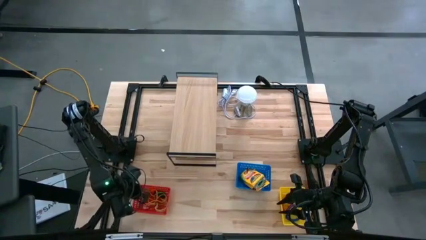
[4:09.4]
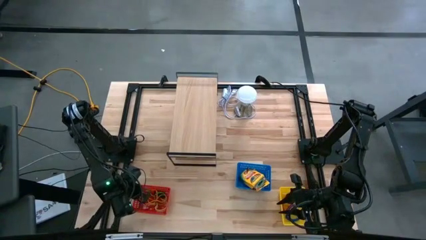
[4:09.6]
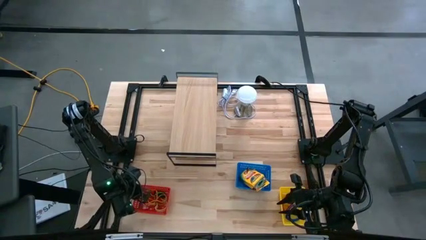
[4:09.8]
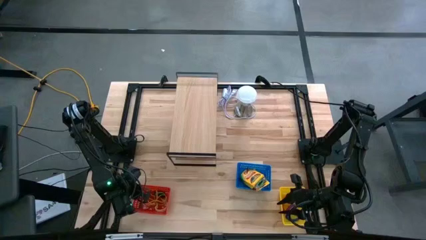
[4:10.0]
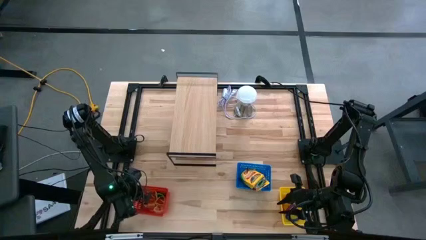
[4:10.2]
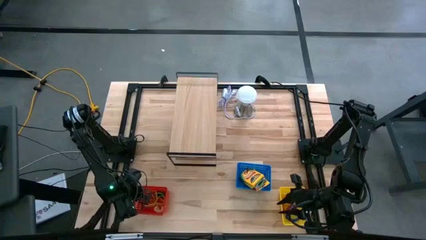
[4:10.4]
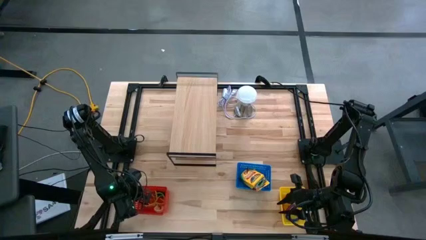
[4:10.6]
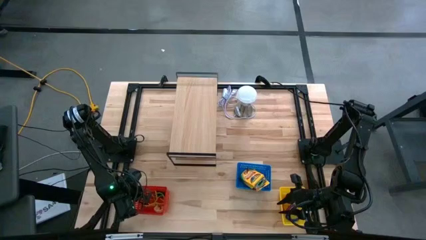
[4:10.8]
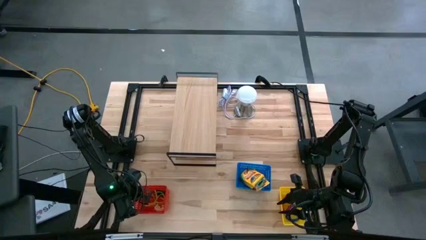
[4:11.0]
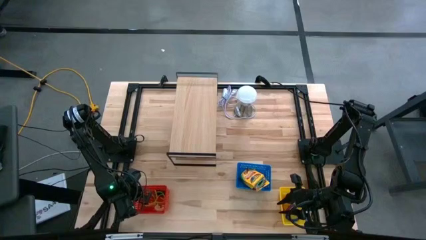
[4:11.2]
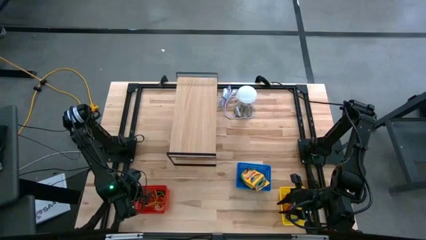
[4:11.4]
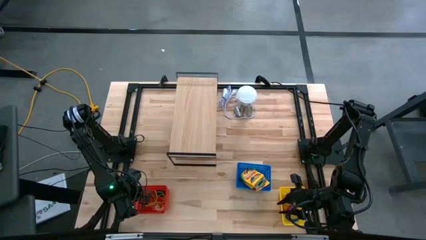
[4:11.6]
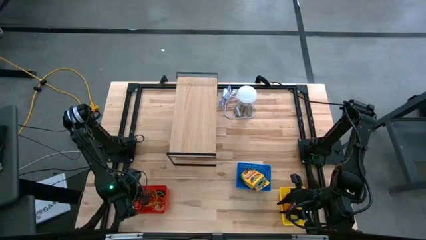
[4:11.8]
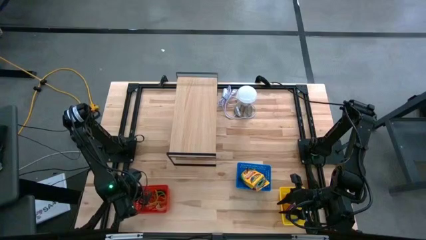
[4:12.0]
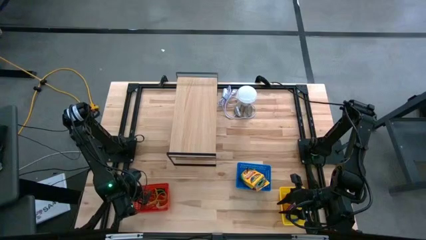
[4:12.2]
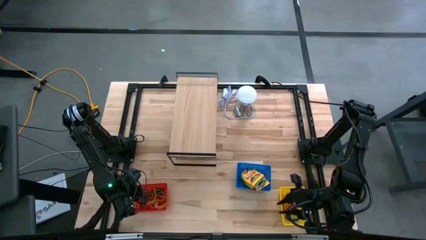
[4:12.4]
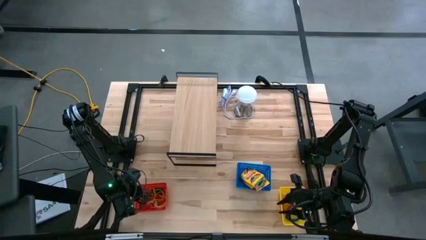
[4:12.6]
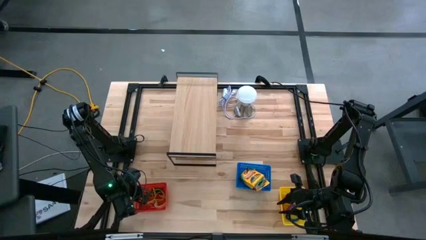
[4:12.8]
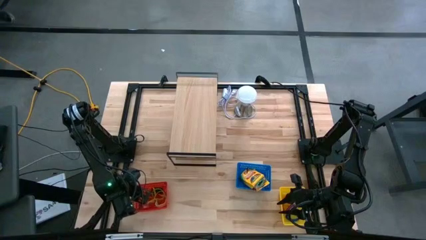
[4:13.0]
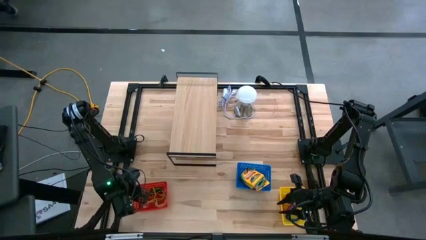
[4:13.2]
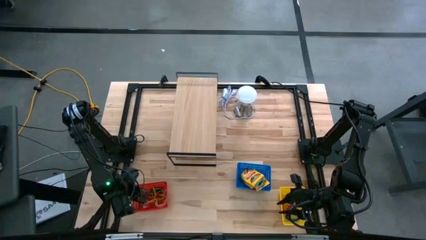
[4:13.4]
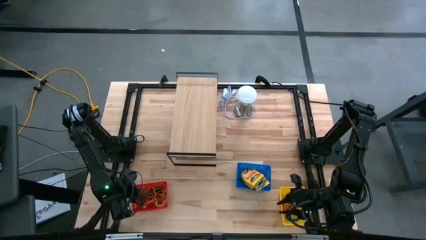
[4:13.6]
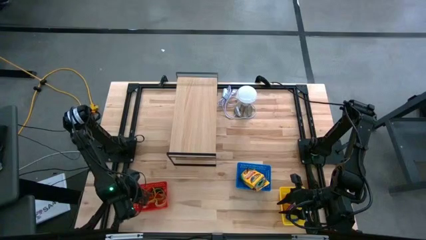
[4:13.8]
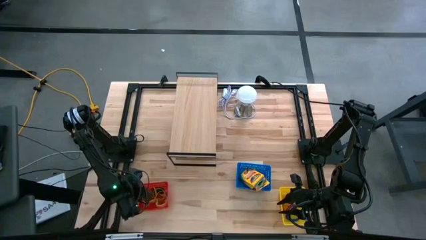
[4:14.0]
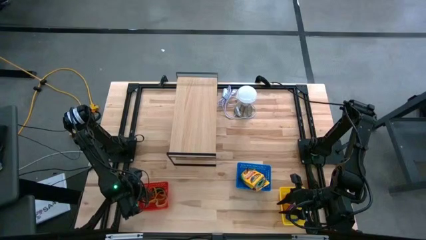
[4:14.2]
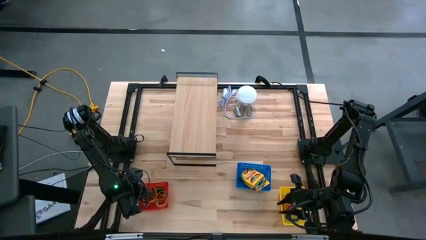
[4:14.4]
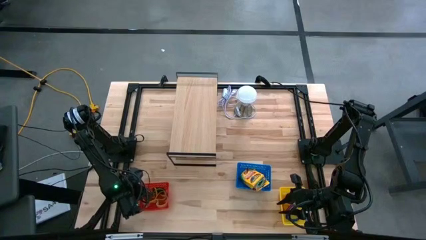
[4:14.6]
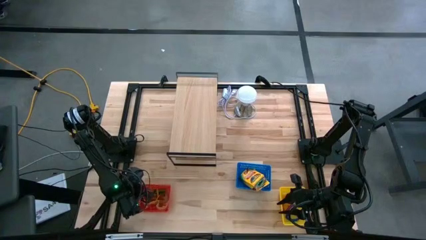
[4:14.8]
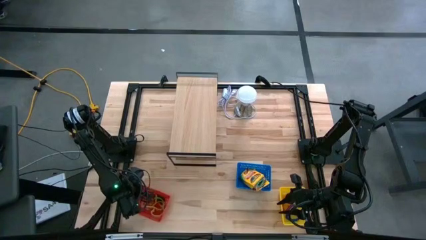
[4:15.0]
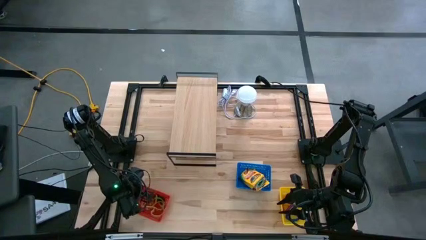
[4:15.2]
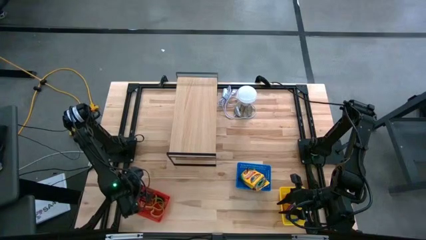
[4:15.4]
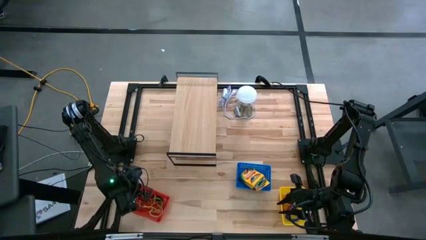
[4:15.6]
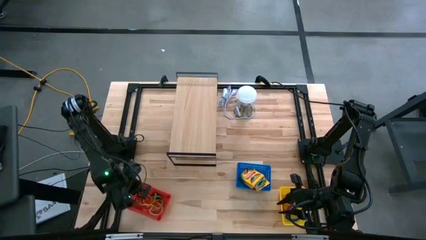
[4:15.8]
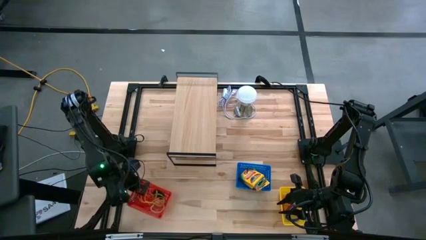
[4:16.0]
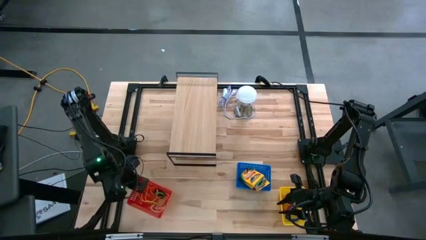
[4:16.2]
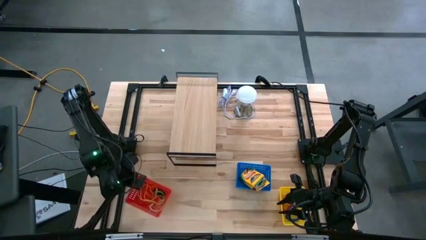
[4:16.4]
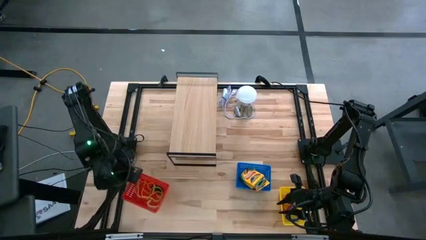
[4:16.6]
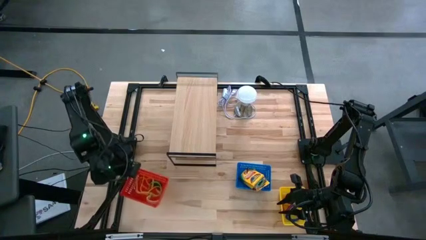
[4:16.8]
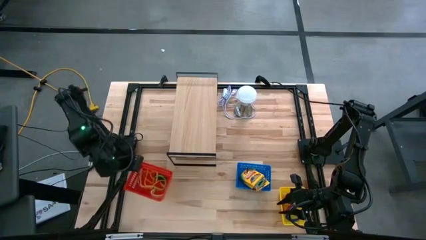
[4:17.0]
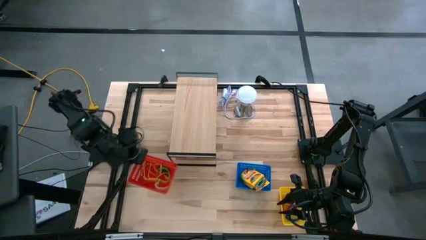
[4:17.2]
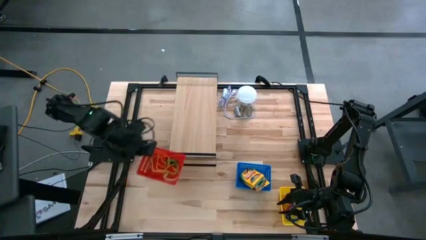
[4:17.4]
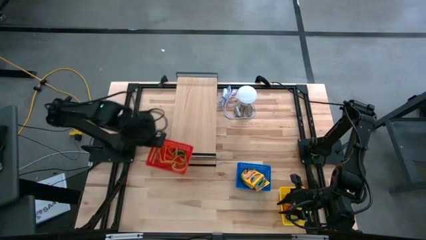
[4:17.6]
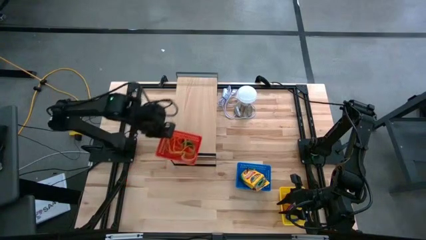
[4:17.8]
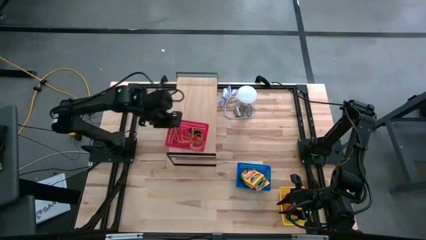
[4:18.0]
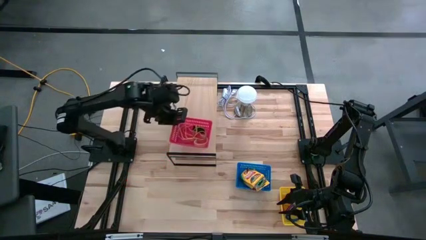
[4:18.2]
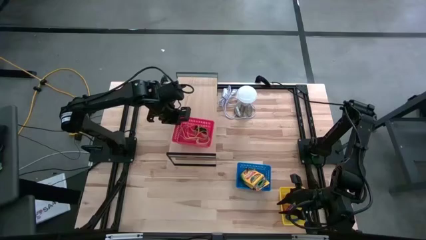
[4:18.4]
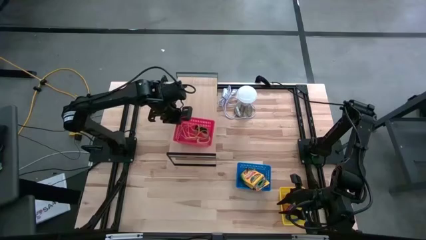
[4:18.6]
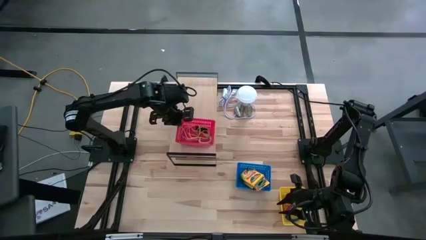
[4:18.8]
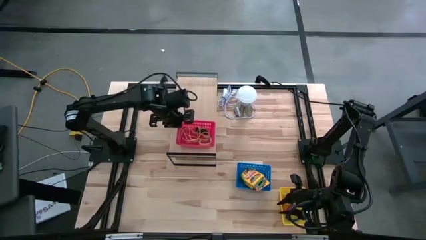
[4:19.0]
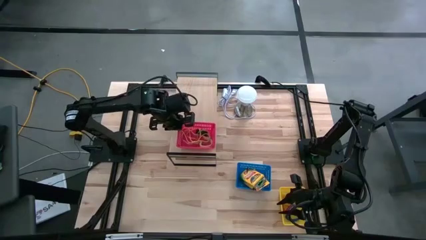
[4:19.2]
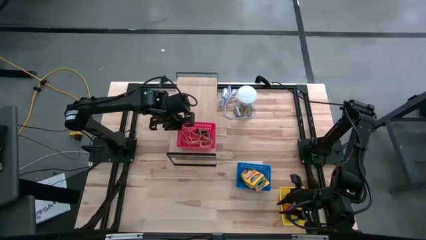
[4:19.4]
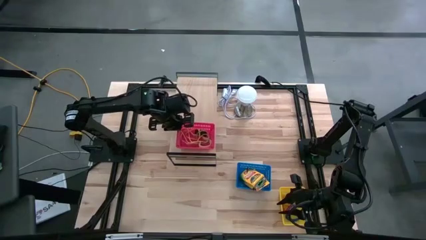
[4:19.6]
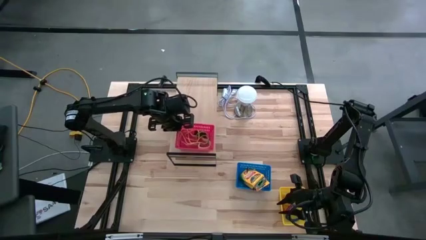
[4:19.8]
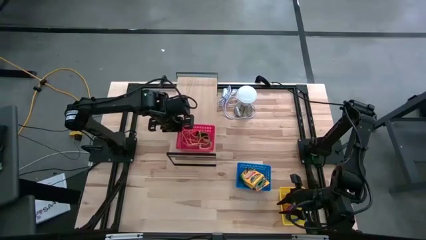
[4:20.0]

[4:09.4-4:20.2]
Task: Pick & Place Office Desk Supplies
Put the red bin on the shelf

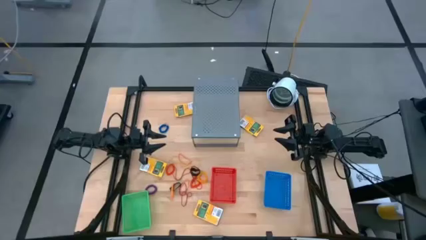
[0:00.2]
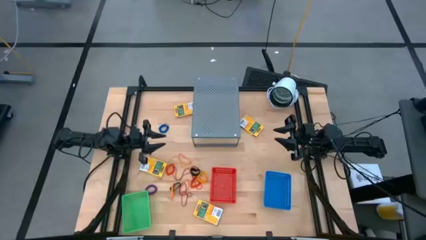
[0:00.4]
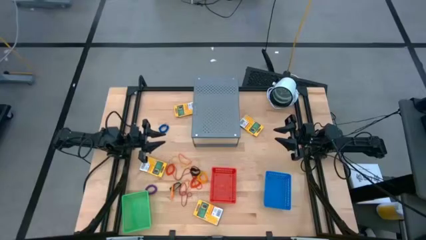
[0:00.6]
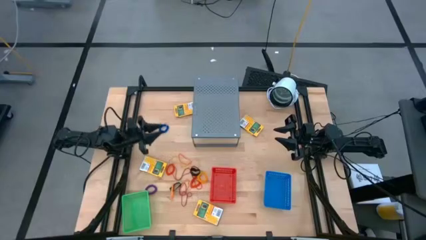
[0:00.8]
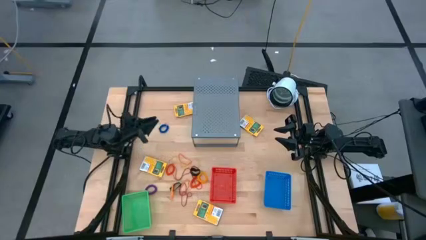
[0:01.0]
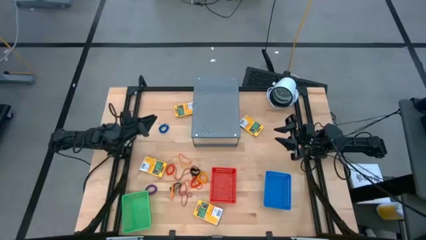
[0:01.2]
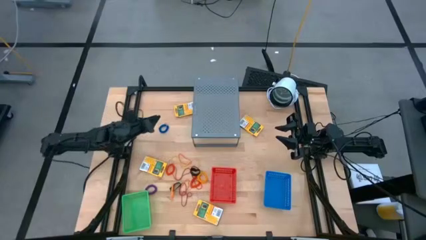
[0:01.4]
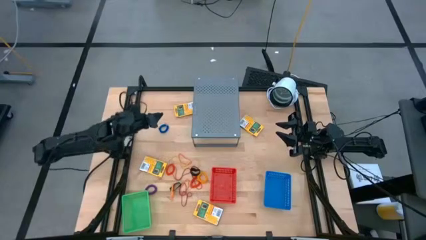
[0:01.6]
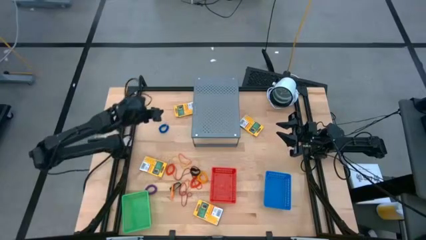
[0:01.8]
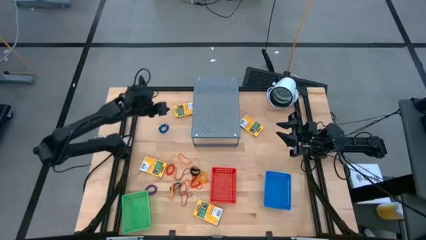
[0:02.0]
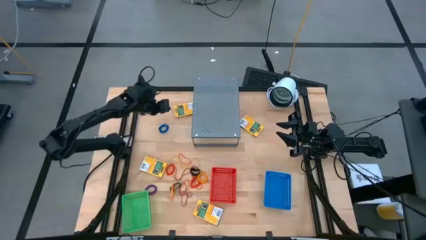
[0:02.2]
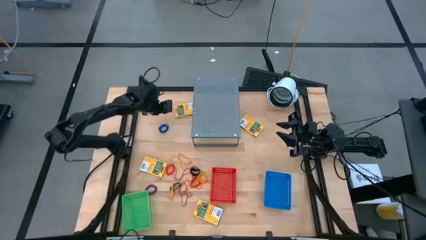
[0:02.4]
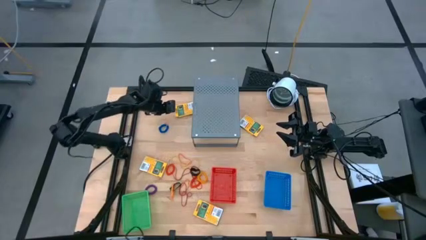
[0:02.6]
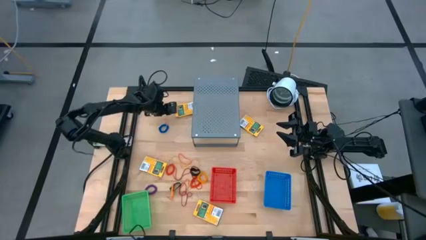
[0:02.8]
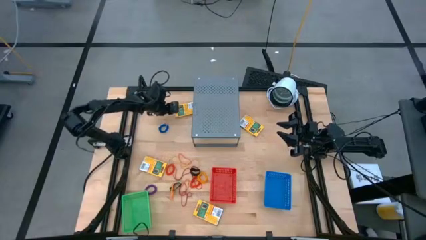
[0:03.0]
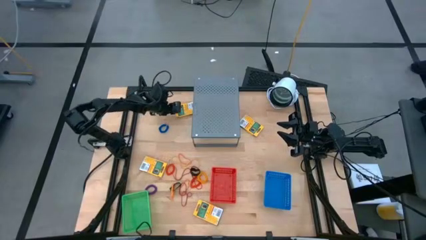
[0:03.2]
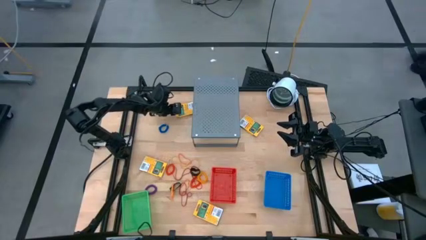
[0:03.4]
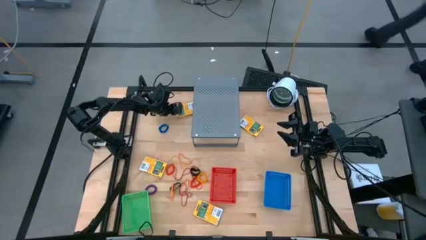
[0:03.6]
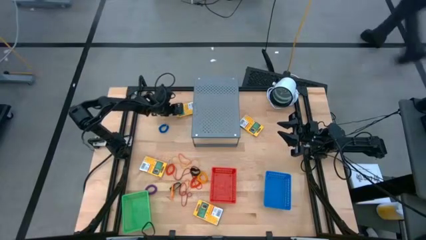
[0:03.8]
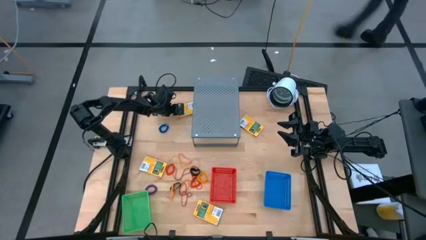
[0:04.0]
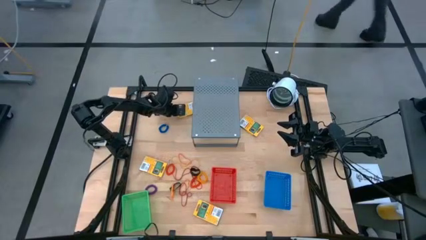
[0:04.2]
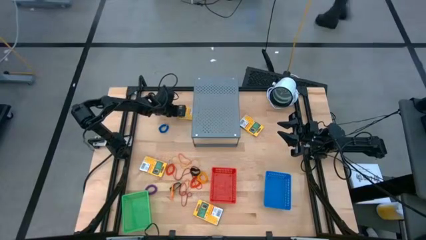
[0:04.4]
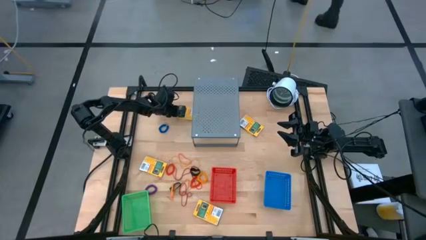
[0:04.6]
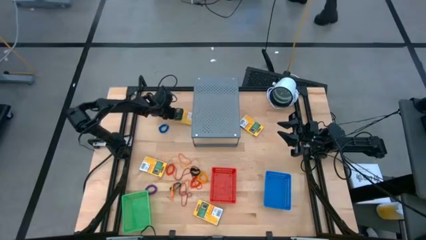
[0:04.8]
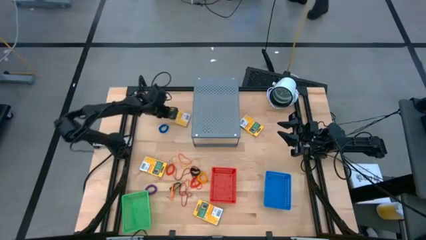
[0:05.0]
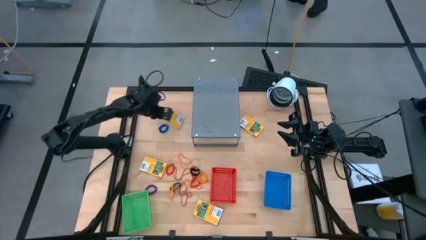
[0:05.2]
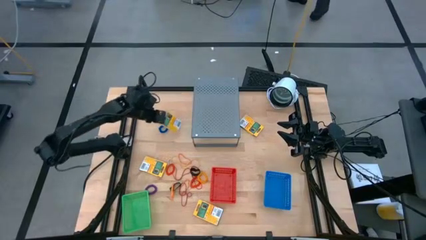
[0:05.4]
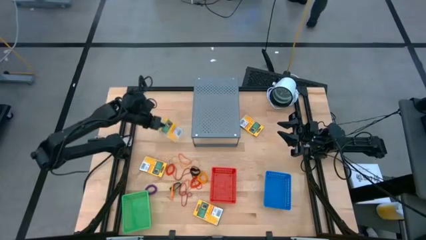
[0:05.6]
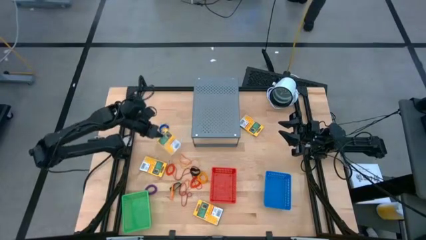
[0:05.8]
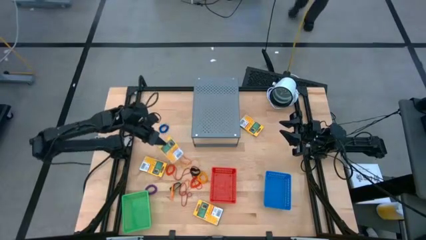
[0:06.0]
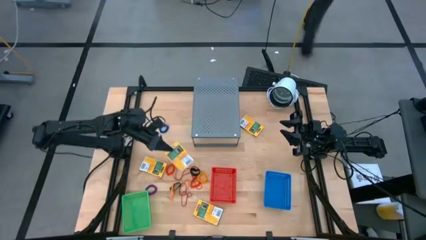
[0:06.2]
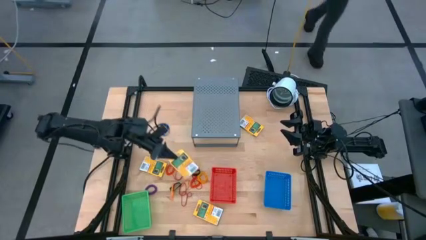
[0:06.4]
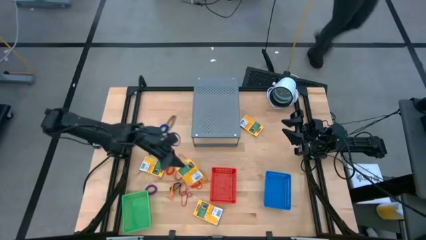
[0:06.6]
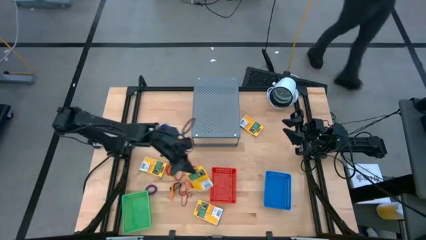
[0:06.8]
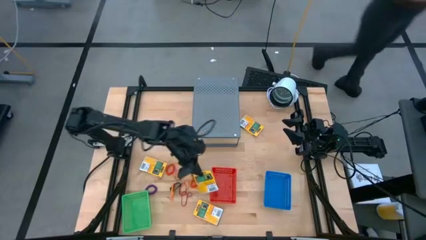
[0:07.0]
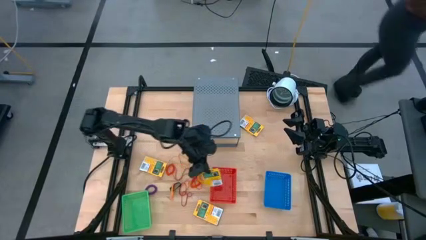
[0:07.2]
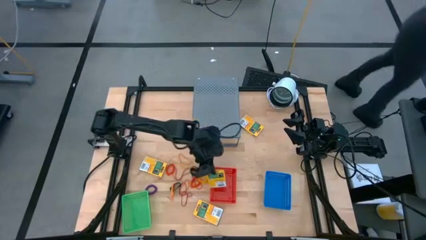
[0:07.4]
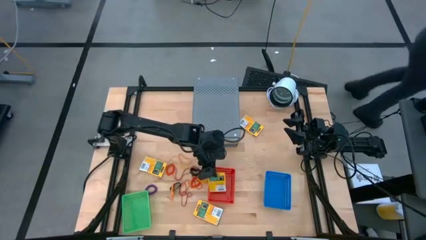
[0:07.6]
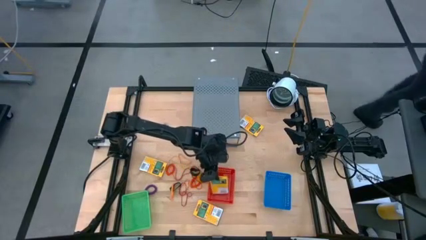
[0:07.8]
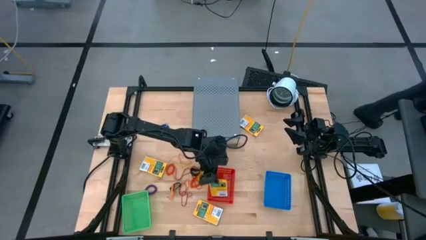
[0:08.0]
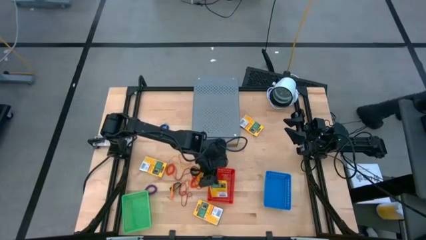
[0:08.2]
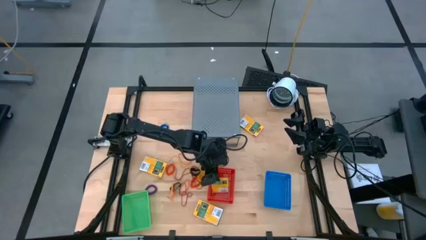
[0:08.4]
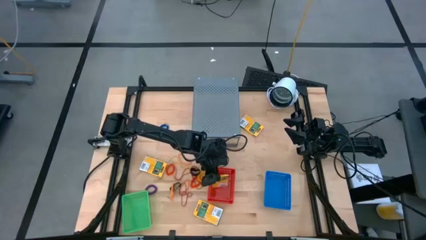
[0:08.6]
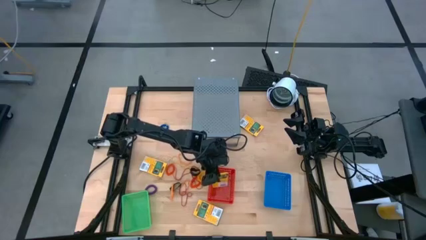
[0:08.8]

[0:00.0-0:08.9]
Task: Pick & Place Office Desk Supplies
Put the yellow crayon box into the red bin
